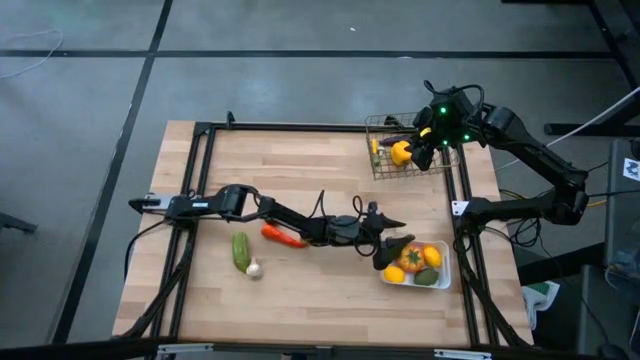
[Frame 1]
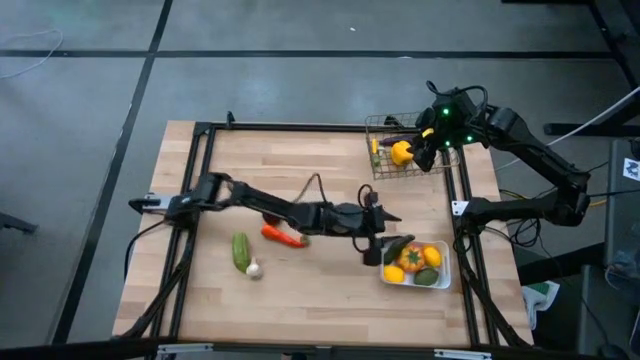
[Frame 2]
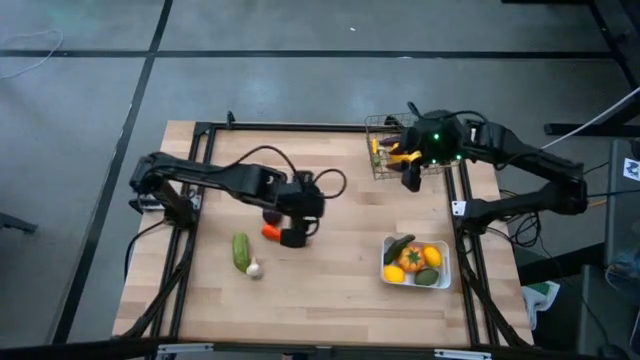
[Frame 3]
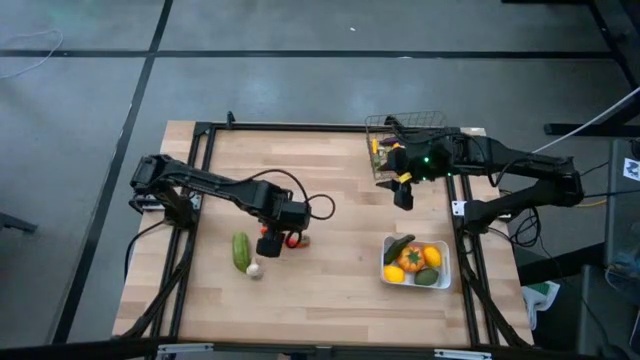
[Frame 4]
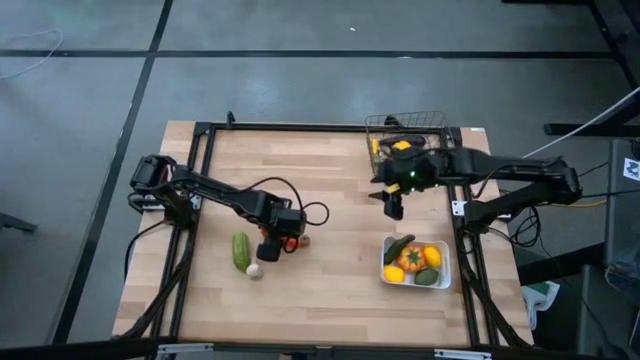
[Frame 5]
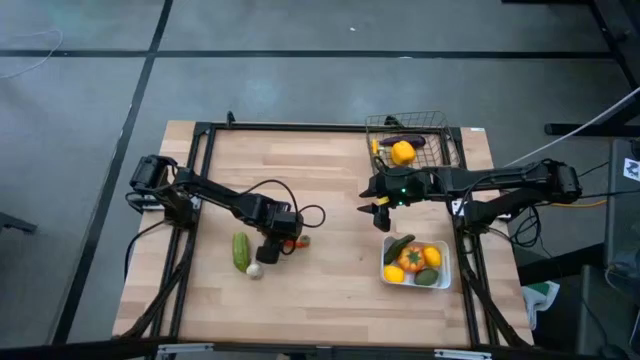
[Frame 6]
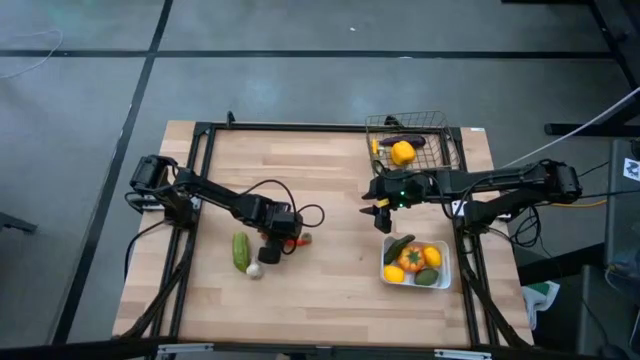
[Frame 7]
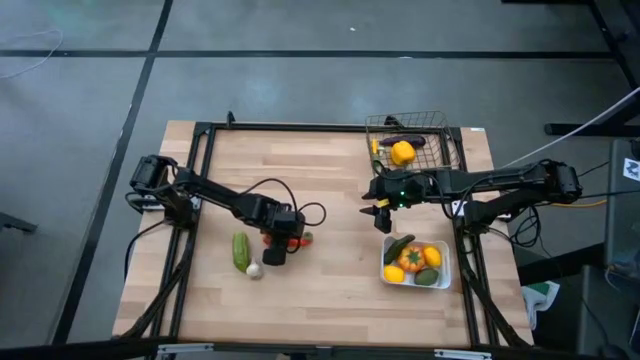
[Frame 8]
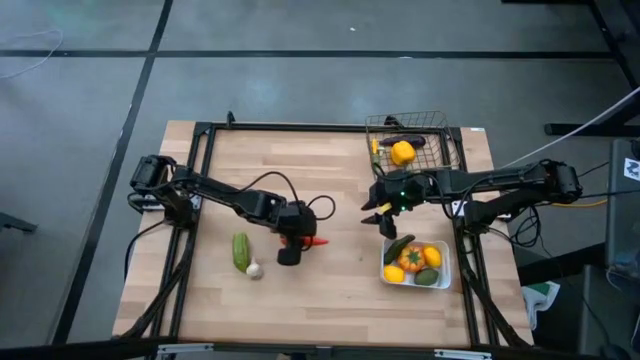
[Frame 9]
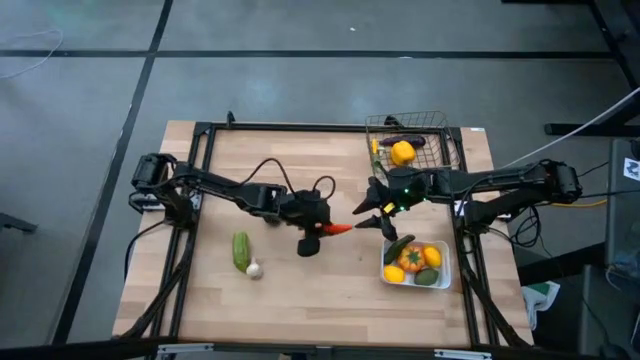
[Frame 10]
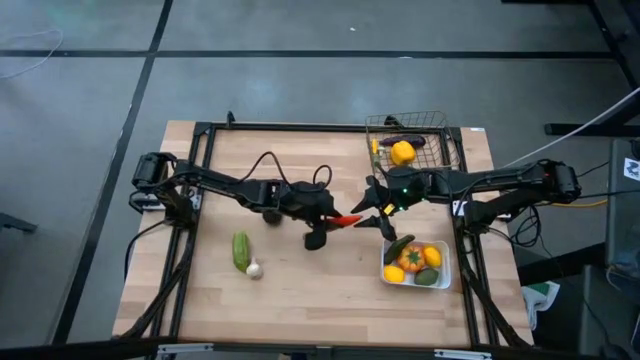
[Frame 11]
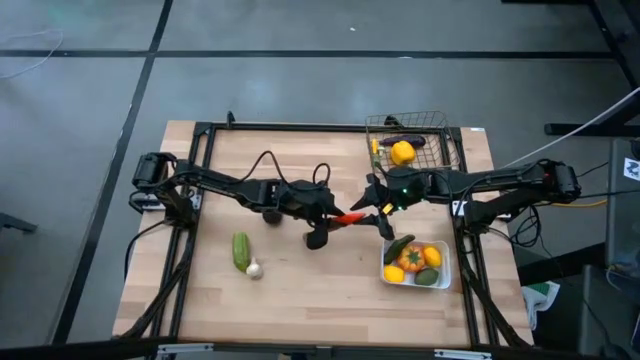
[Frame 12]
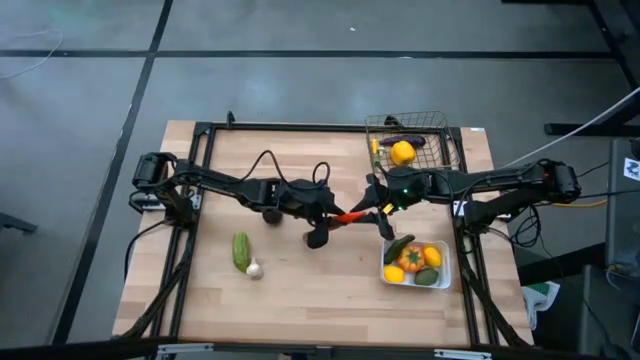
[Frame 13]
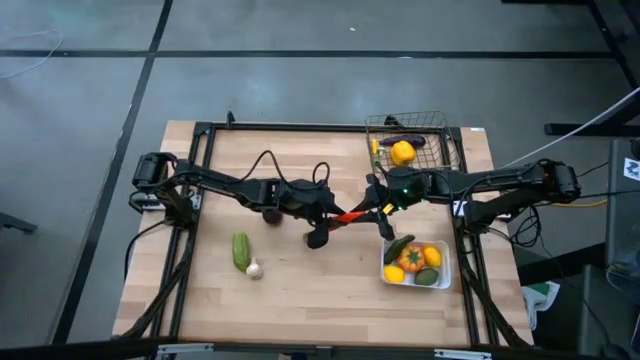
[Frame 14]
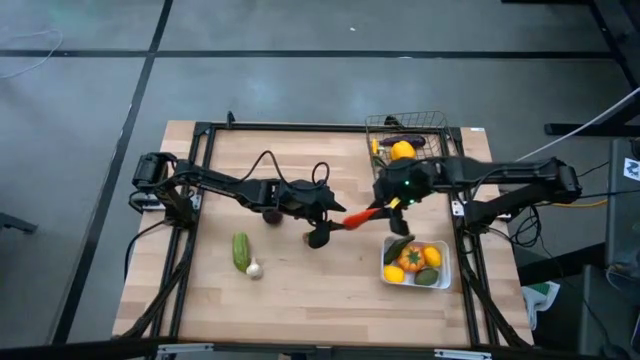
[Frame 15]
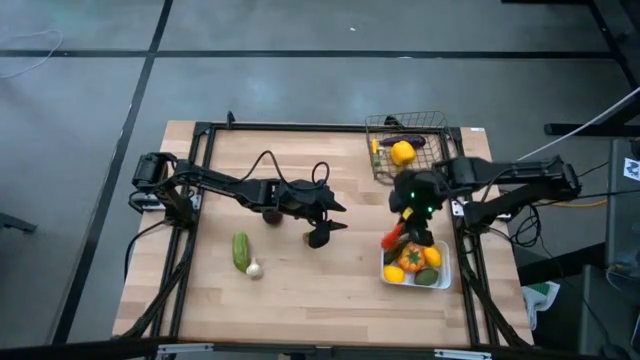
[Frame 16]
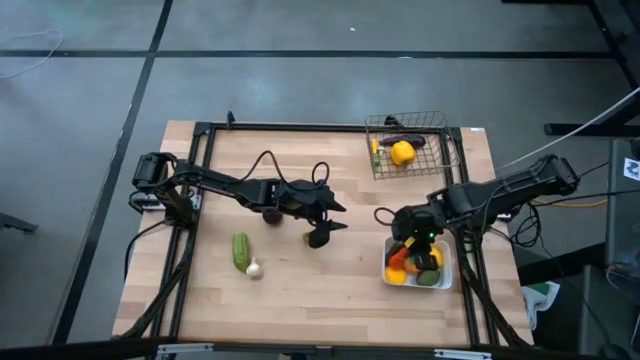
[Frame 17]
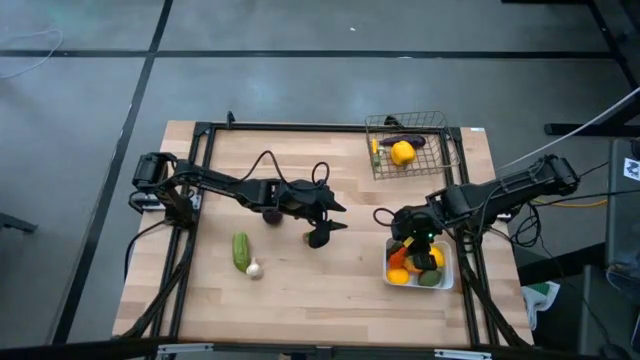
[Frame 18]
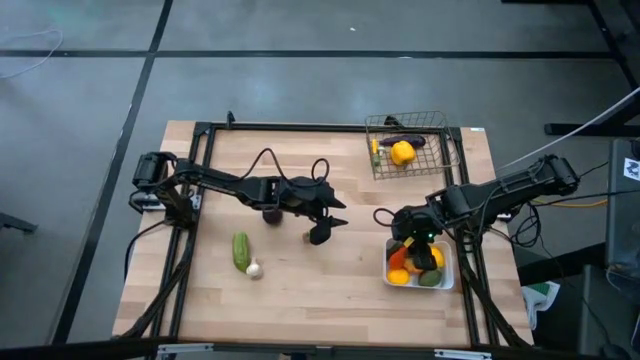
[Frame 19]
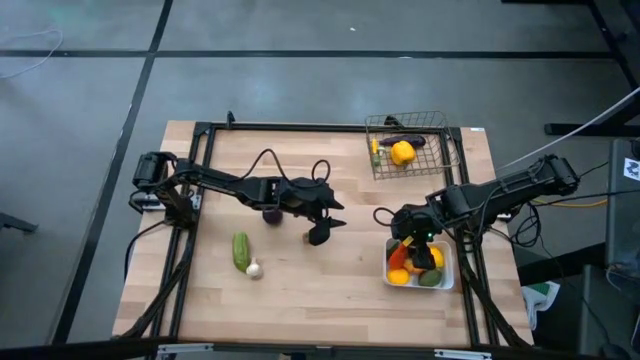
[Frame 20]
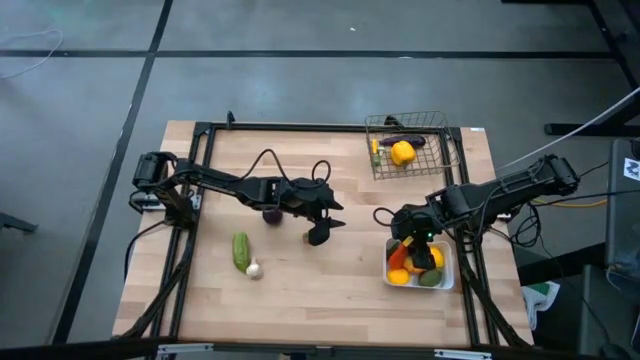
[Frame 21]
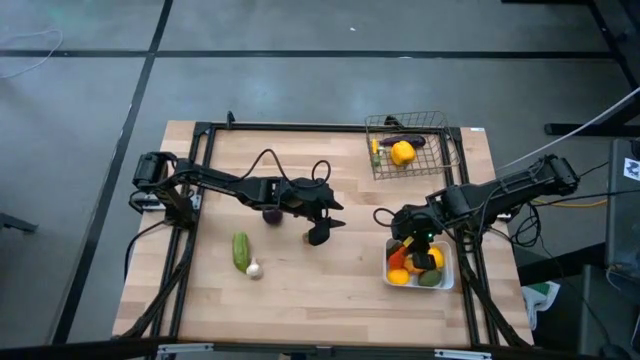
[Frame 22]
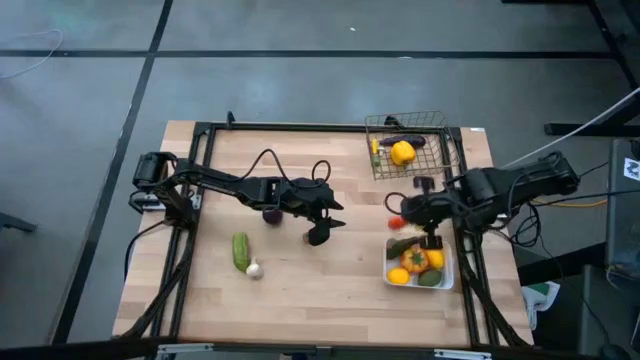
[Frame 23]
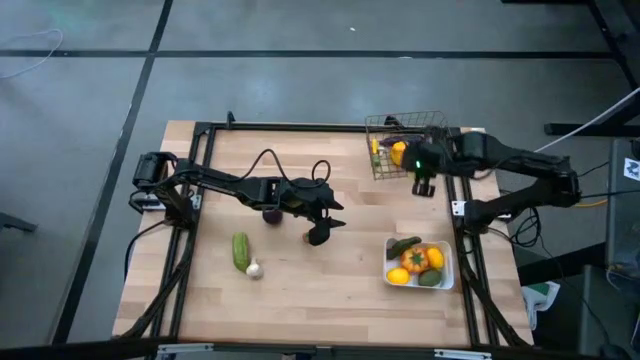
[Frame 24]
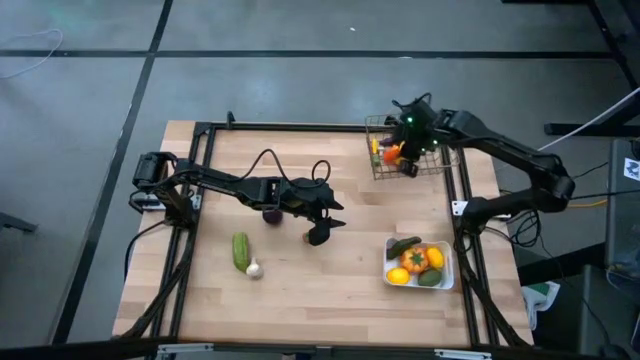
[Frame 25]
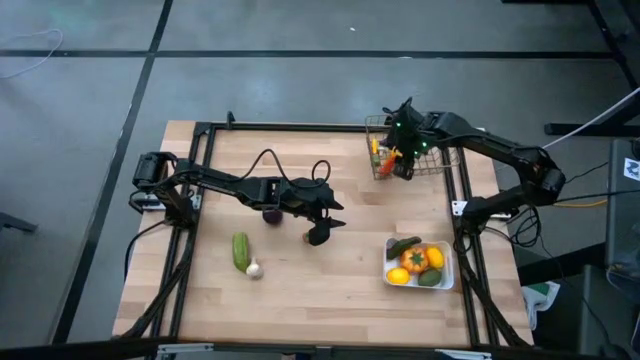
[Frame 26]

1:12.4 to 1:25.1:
Task: Sort produce into baskets
Put the orange carrot into the black wire basket

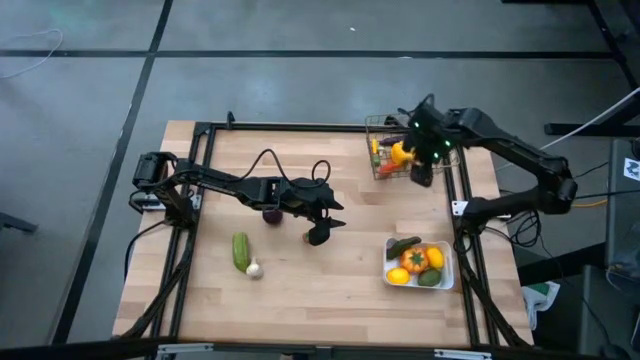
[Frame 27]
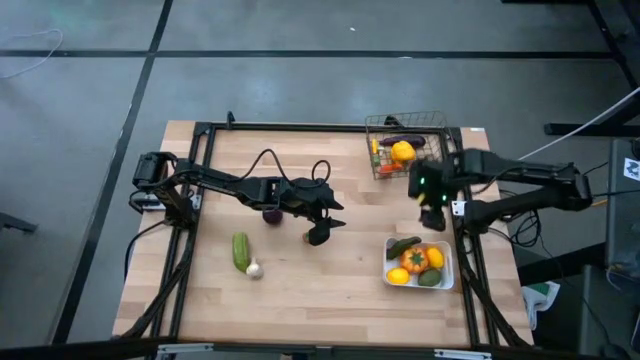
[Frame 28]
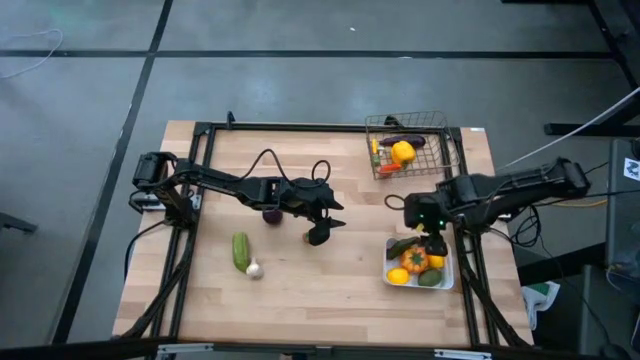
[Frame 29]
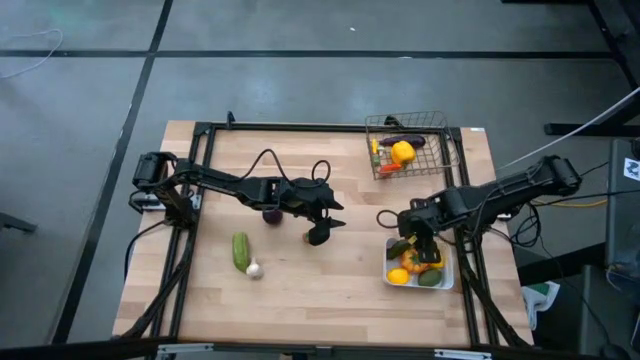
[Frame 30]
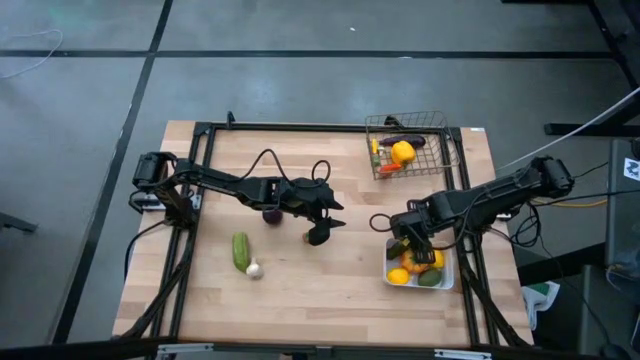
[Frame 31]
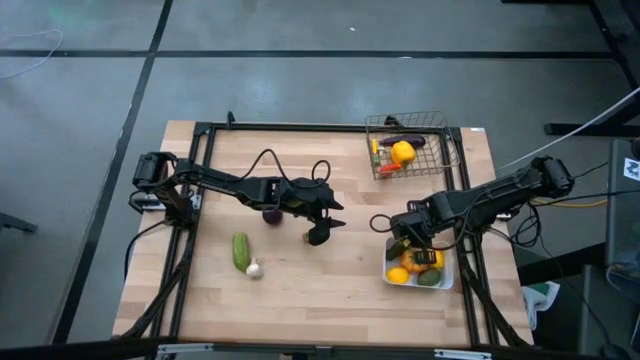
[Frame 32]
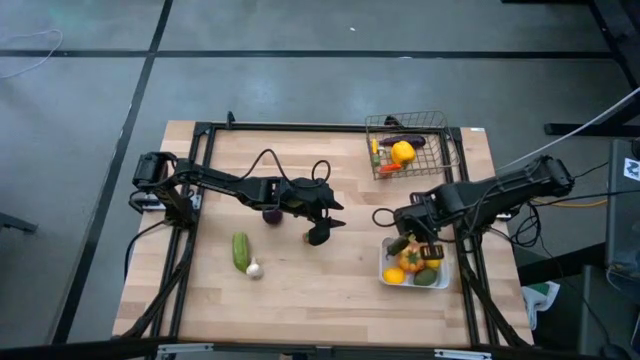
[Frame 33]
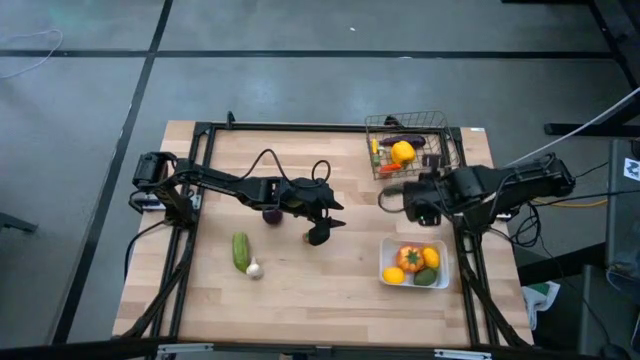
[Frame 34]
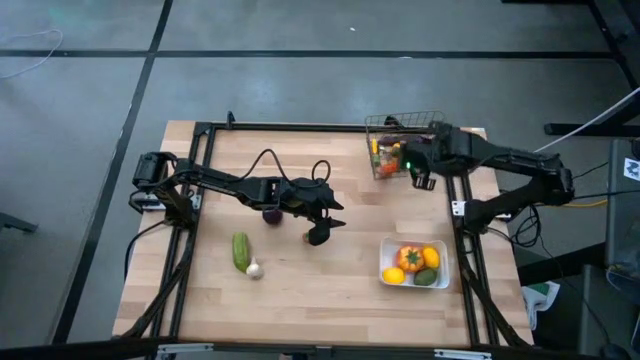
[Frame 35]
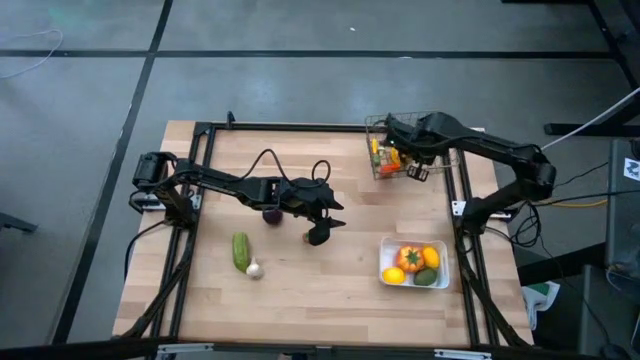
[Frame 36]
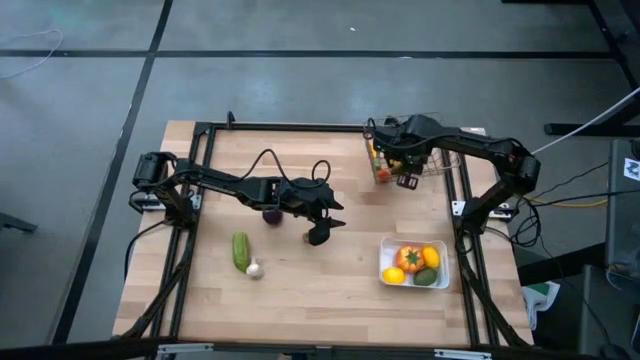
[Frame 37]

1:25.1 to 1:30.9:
Put the green chili pepper into the black wire basket

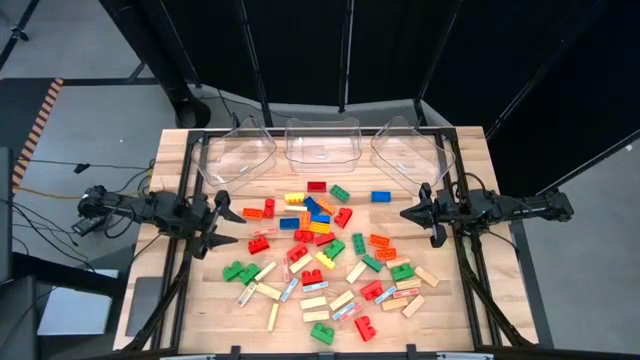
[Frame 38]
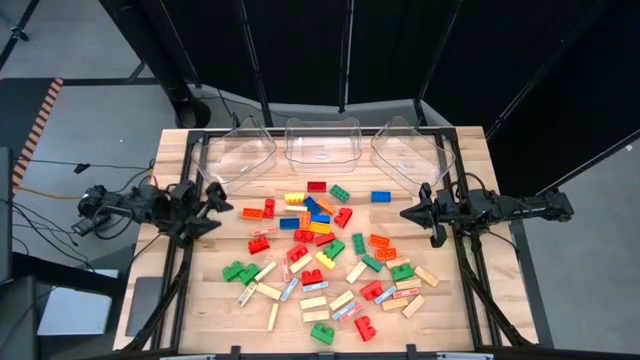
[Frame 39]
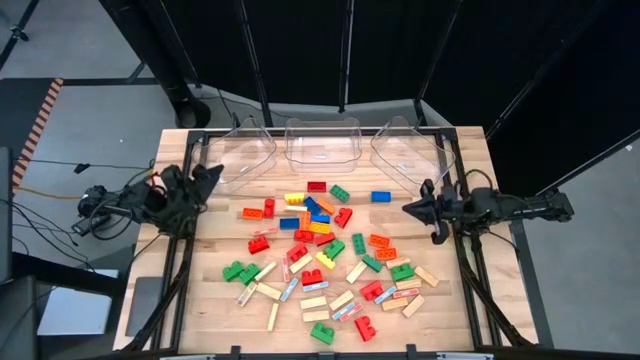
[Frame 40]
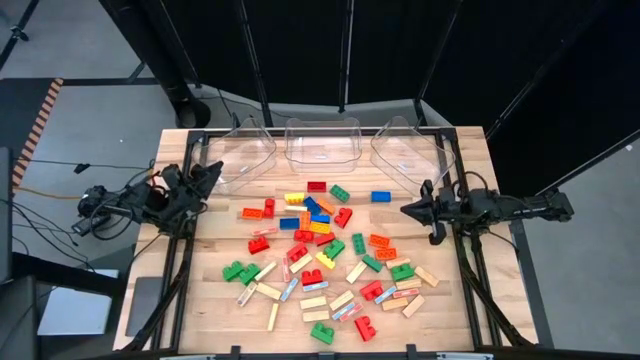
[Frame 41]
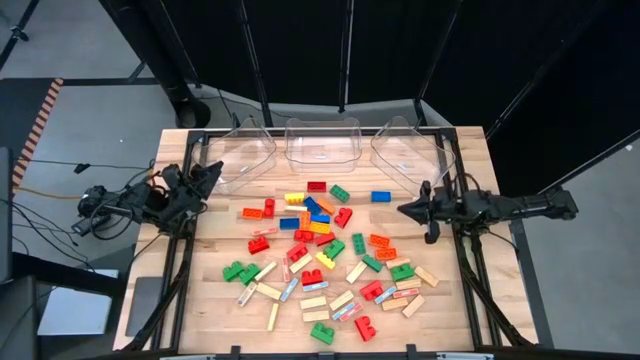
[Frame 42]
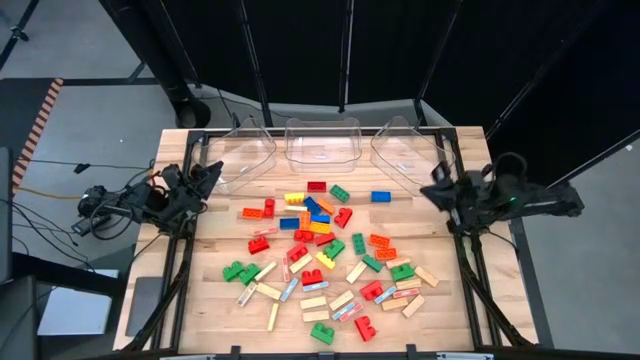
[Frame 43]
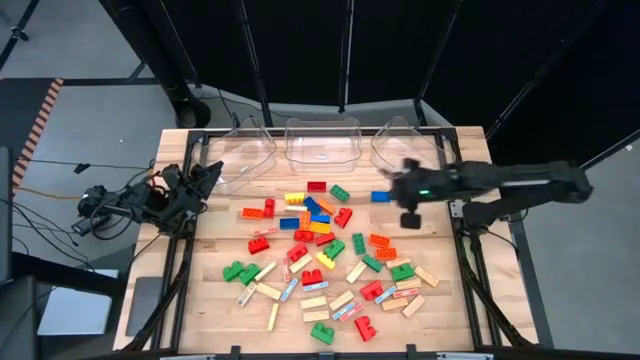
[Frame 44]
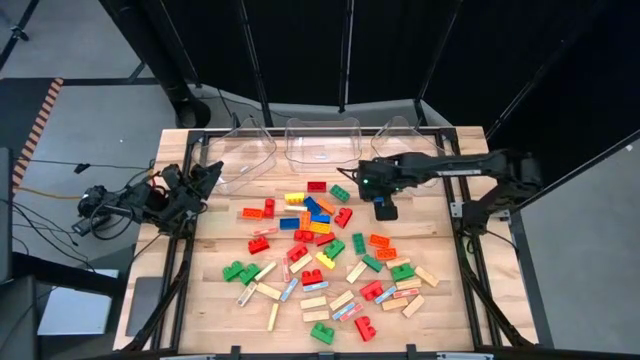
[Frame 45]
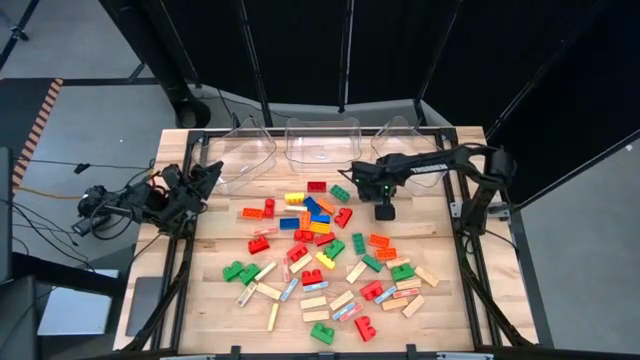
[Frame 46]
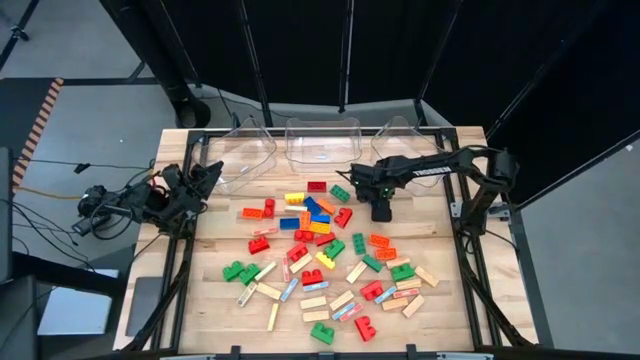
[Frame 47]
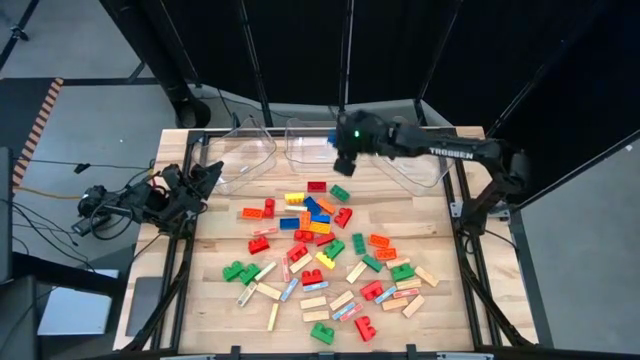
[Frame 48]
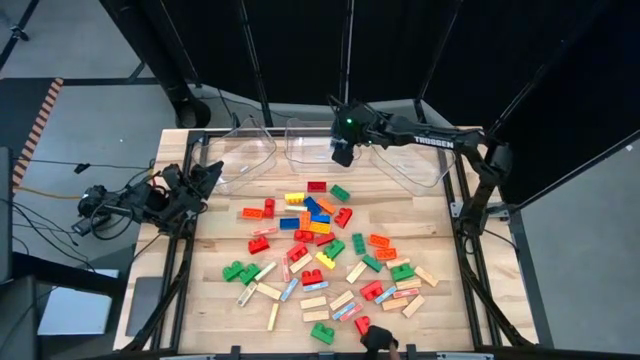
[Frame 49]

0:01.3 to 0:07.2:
Task: Sort blocks by size
Put the large blue game piece into the middle transparent bin
